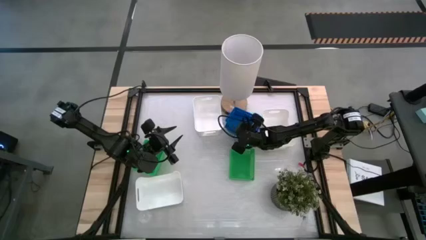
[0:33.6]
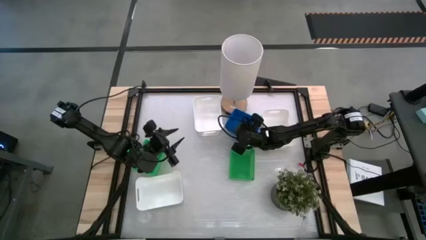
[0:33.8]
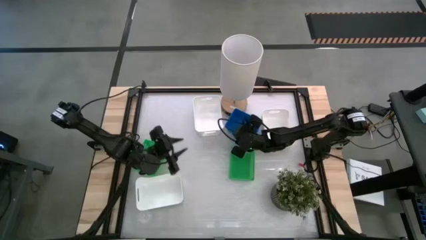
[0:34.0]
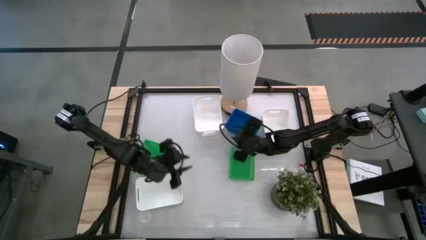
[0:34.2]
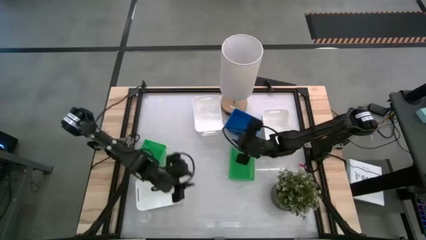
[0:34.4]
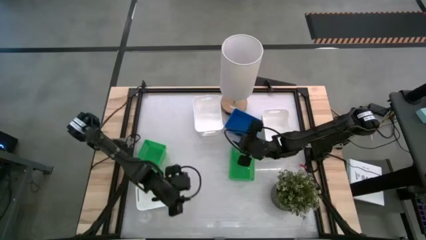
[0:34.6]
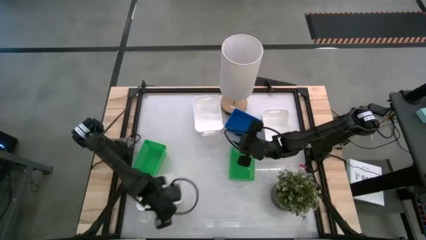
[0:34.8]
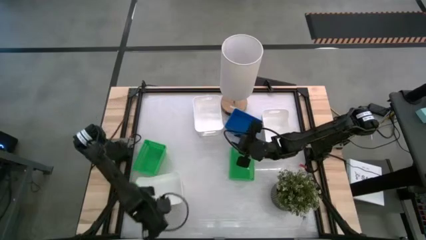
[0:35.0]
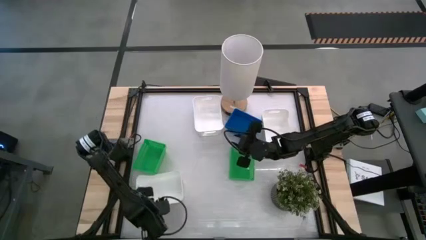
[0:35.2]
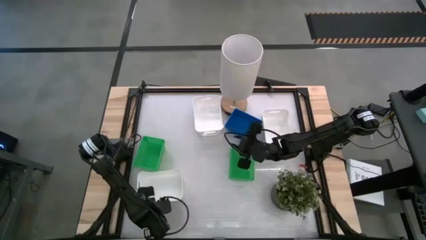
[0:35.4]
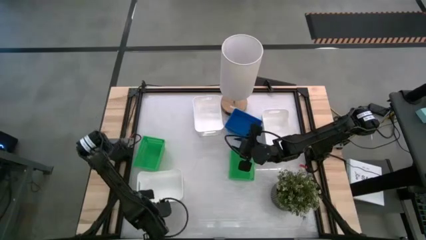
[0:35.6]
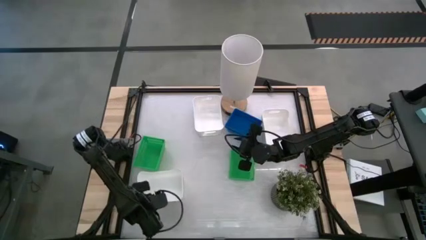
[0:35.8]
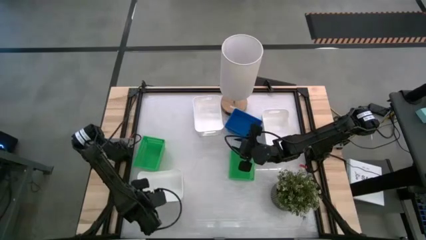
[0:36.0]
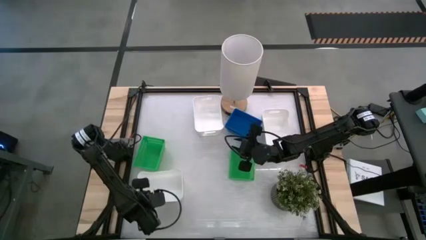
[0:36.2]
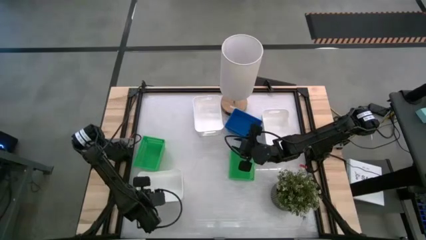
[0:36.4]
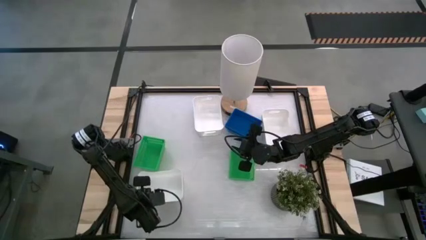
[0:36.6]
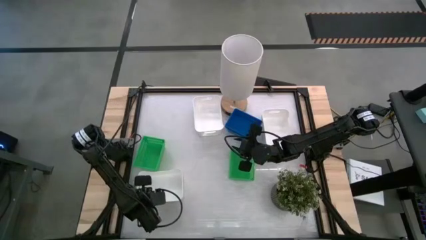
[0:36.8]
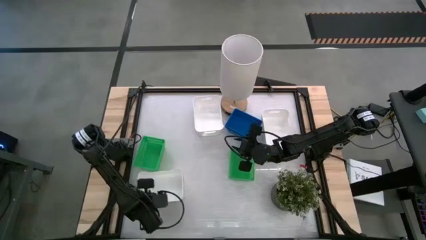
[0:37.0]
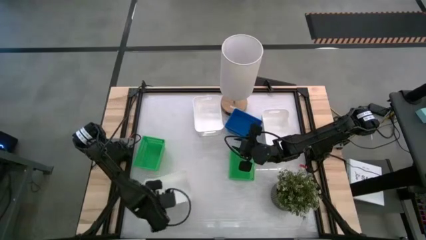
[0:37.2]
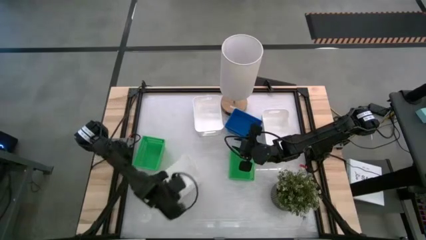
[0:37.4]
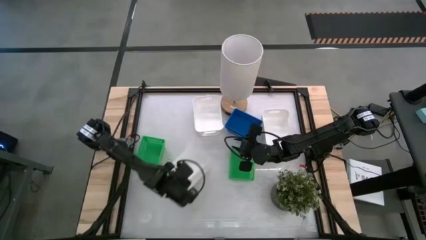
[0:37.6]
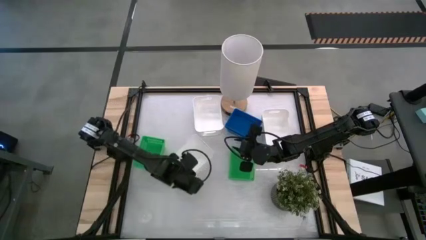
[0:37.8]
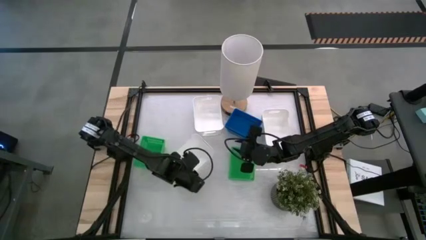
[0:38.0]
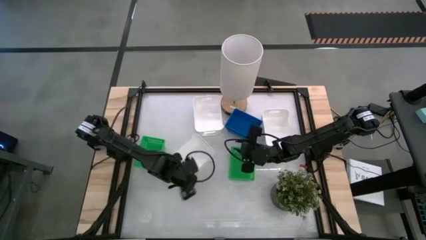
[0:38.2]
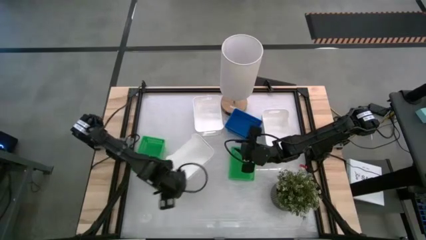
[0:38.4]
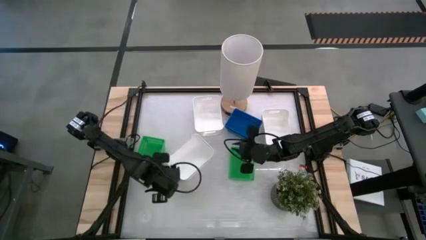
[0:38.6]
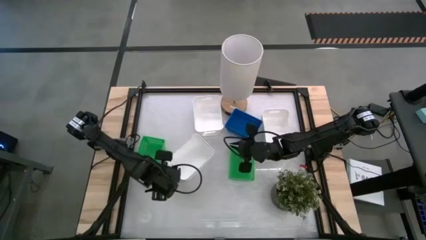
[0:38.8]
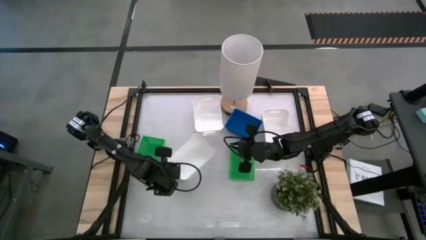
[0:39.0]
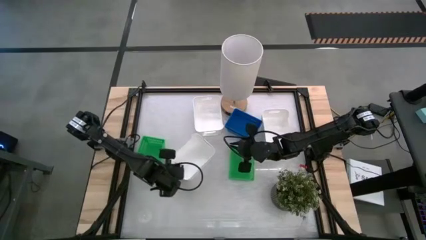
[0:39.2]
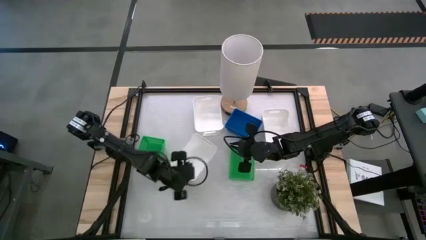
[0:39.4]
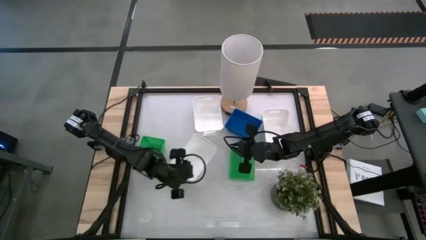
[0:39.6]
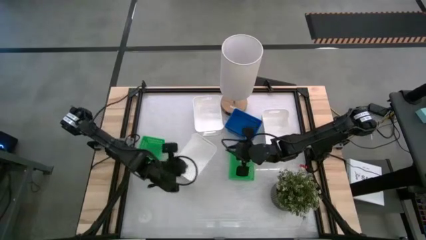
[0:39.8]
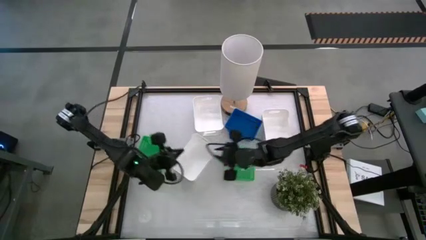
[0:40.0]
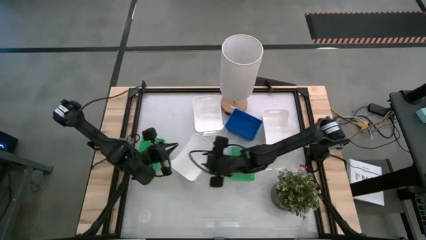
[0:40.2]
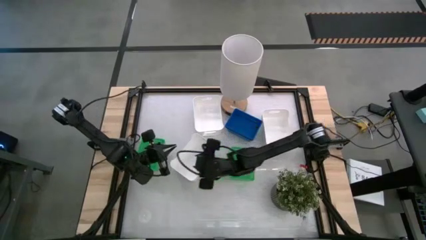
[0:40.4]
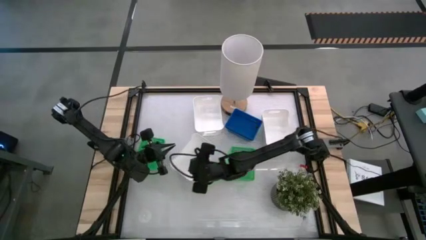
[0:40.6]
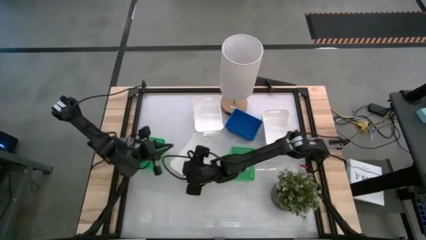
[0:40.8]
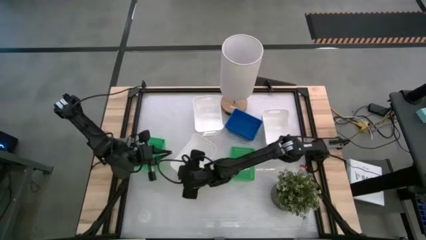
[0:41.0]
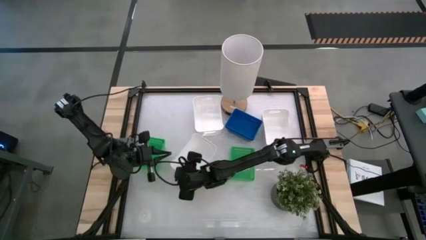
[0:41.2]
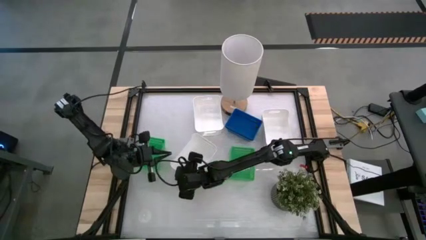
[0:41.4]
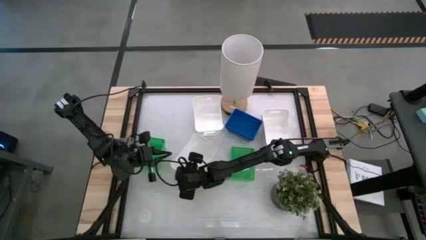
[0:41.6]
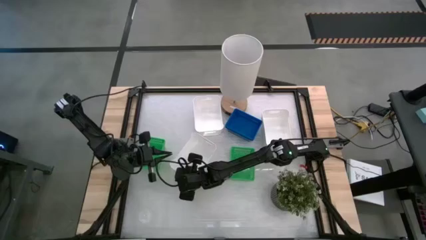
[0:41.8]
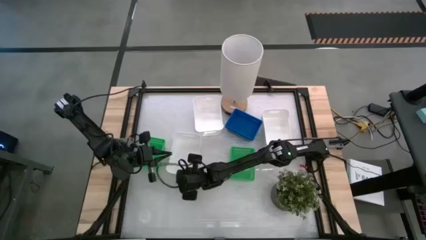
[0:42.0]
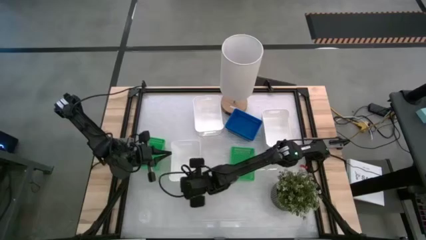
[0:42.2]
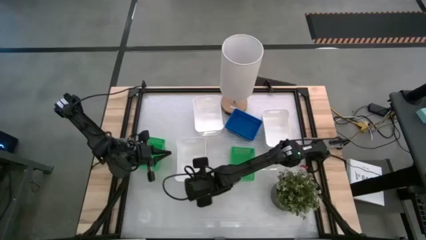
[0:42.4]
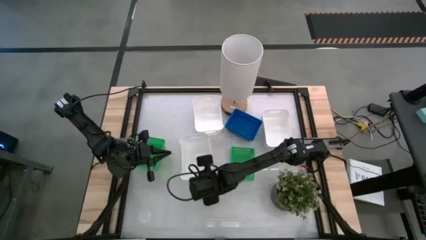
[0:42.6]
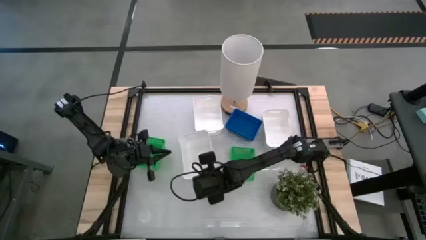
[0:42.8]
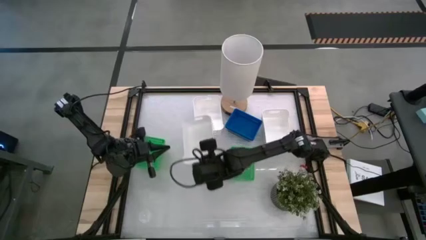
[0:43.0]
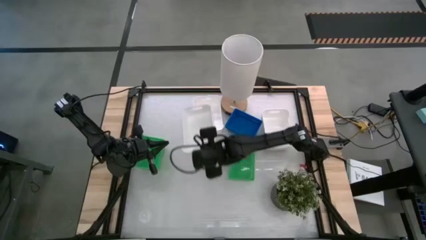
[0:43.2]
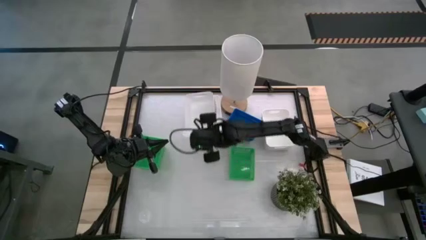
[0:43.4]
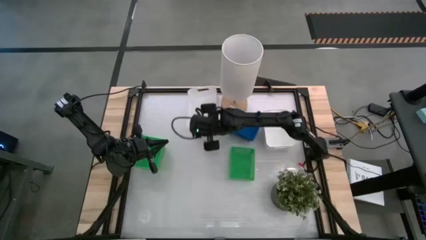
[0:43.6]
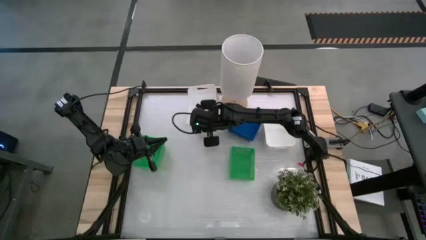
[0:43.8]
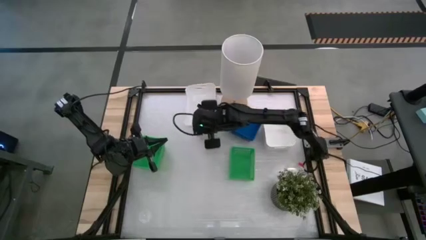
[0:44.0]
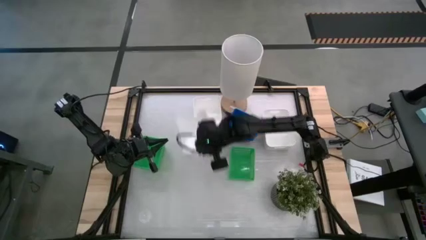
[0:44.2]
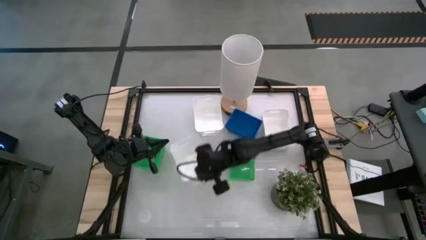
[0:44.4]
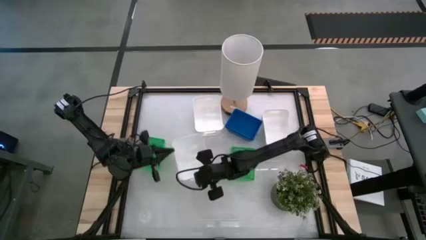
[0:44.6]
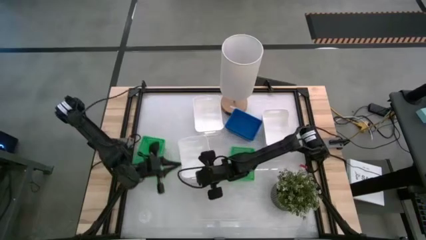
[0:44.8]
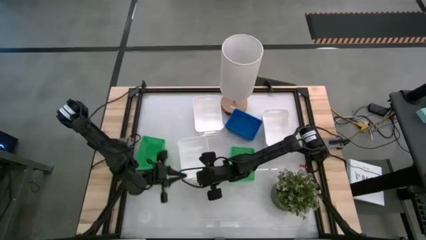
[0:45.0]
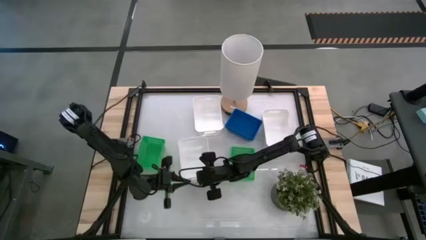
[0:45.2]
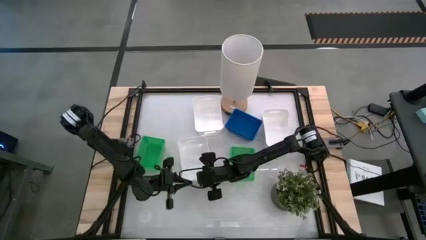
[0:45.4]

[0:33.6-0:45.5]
Stack the bottom white bin on top of the top white bin on the table
